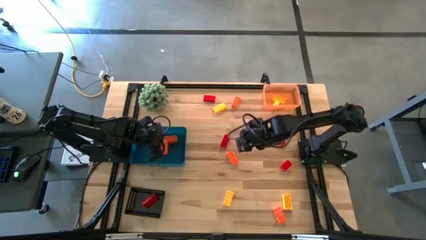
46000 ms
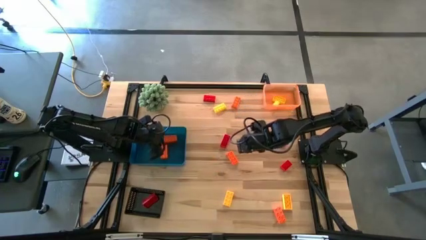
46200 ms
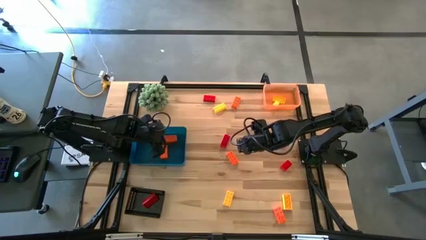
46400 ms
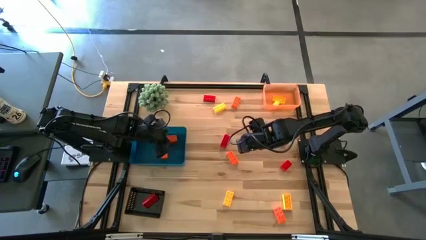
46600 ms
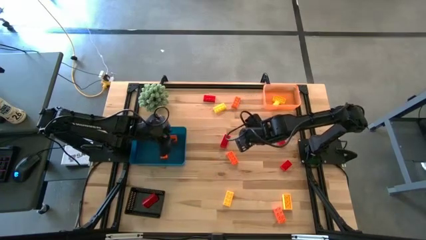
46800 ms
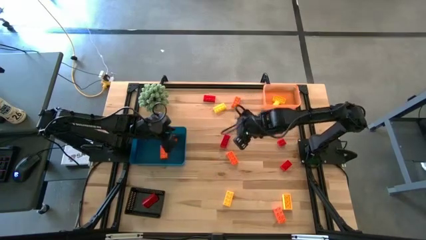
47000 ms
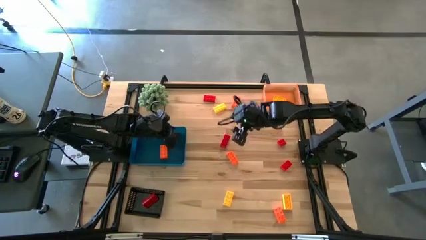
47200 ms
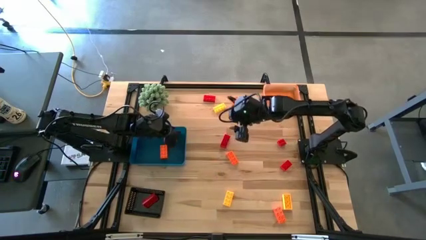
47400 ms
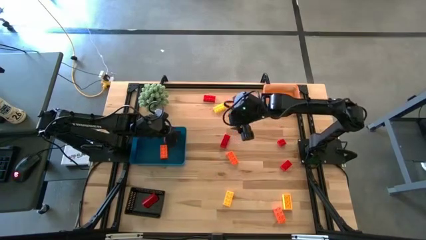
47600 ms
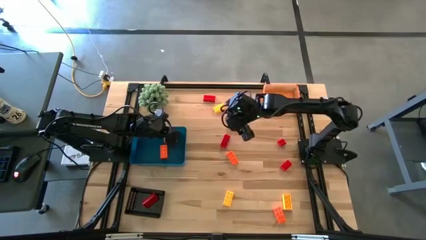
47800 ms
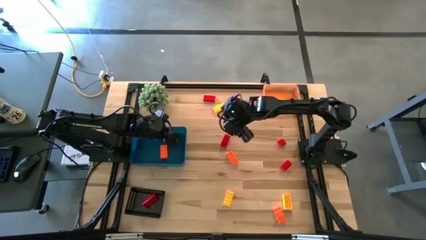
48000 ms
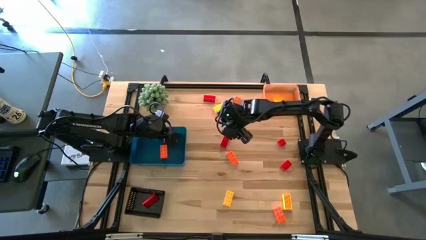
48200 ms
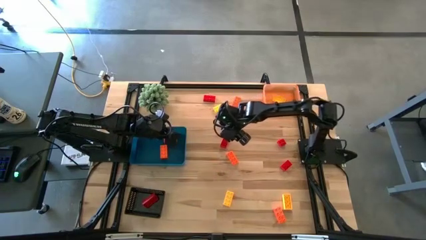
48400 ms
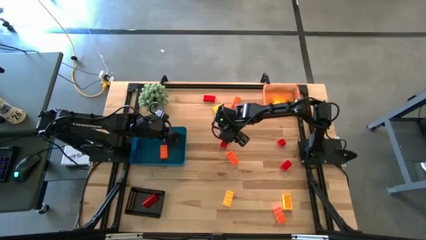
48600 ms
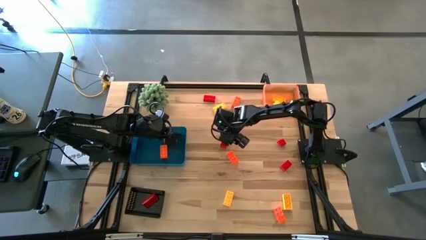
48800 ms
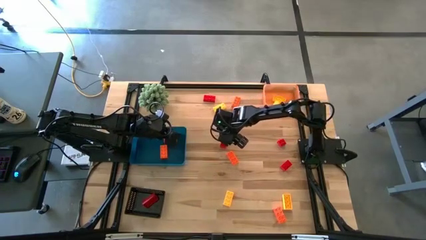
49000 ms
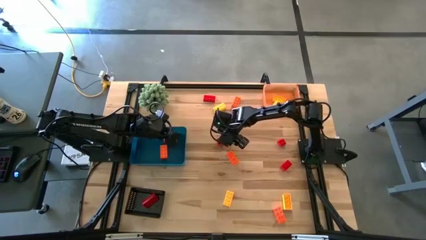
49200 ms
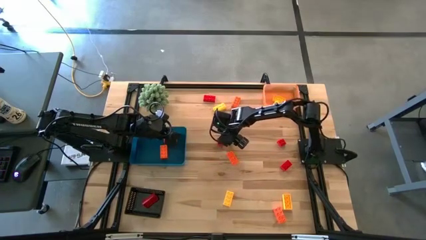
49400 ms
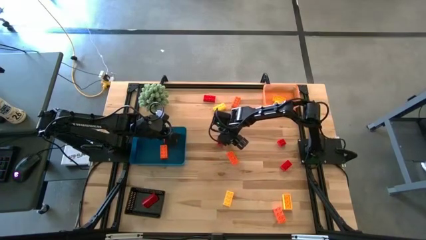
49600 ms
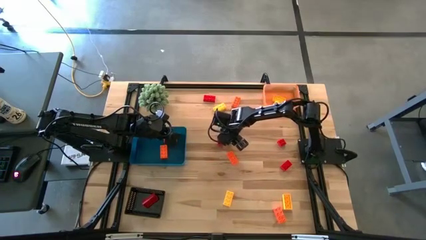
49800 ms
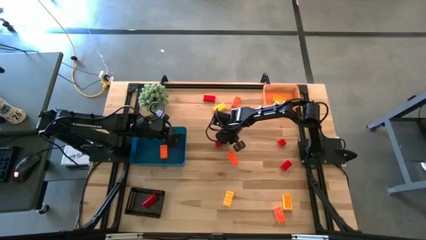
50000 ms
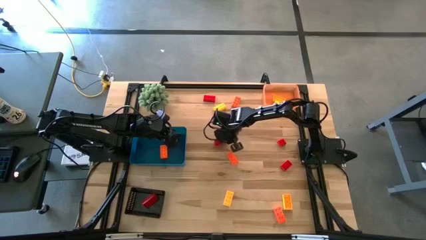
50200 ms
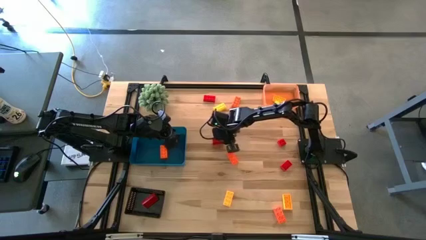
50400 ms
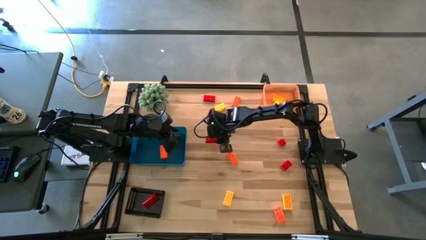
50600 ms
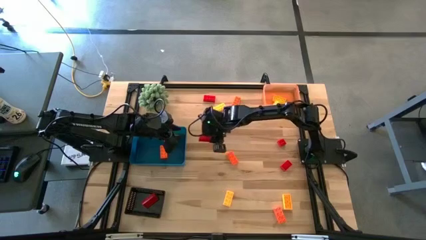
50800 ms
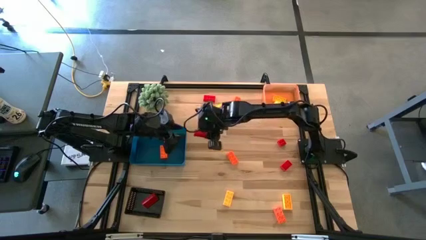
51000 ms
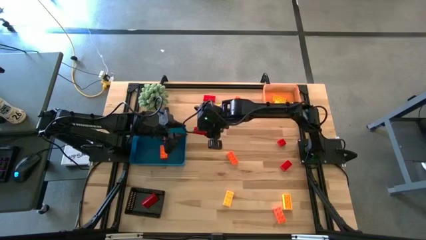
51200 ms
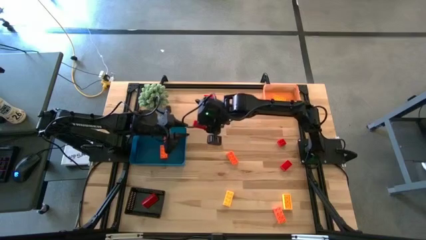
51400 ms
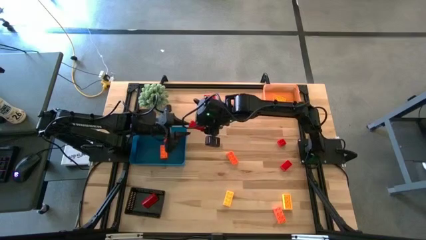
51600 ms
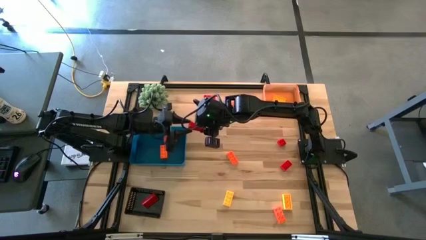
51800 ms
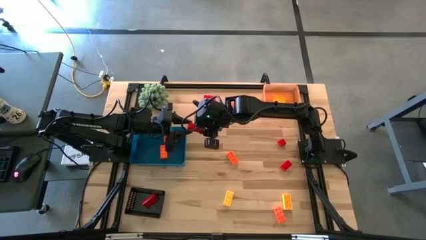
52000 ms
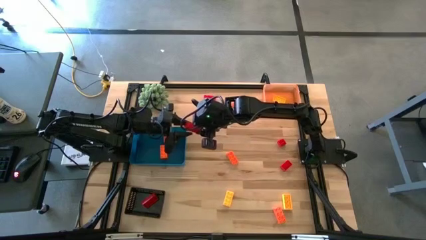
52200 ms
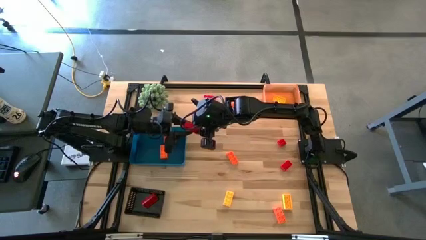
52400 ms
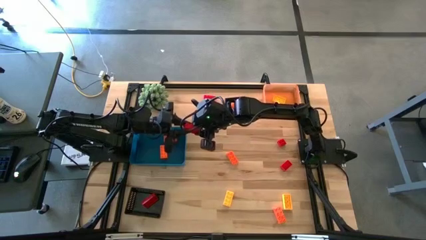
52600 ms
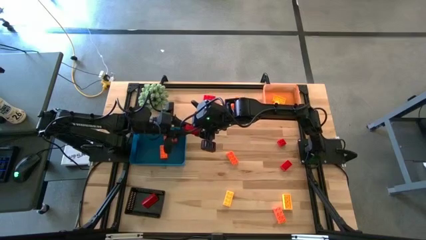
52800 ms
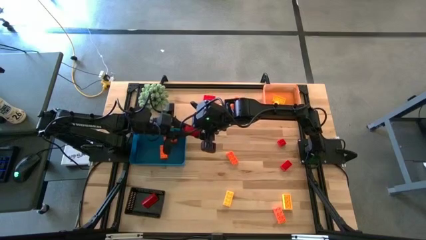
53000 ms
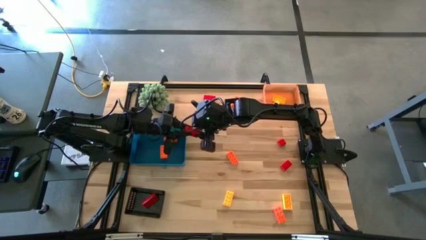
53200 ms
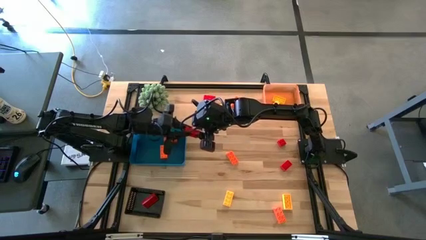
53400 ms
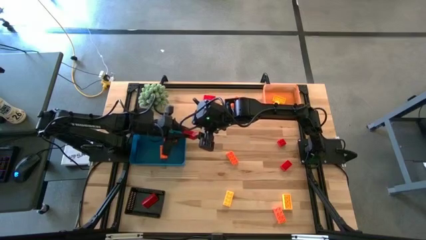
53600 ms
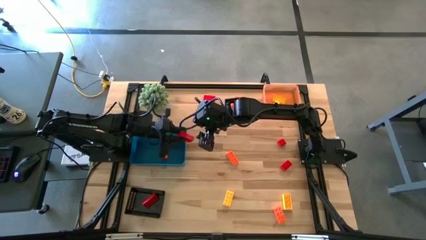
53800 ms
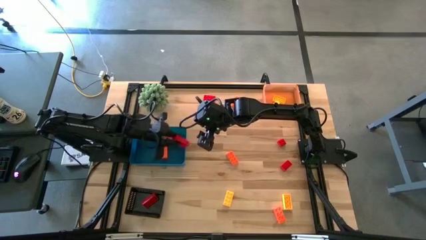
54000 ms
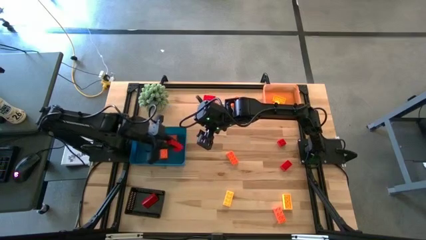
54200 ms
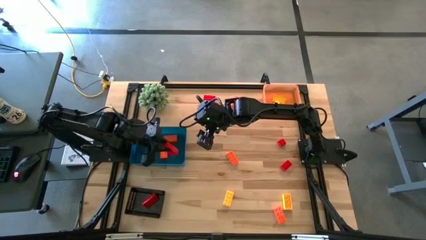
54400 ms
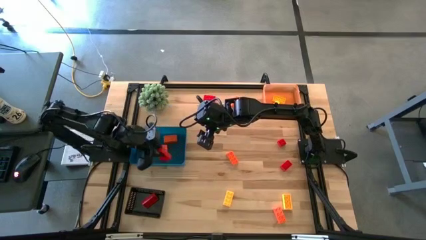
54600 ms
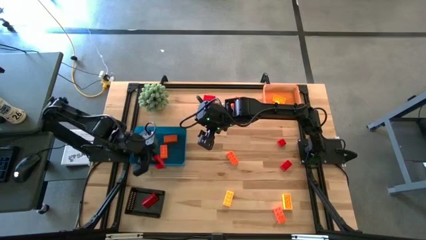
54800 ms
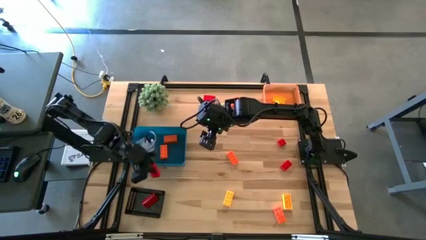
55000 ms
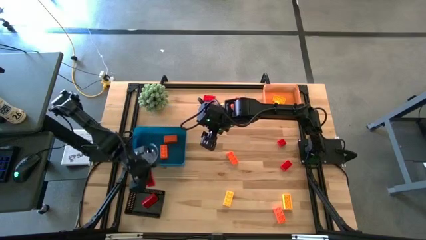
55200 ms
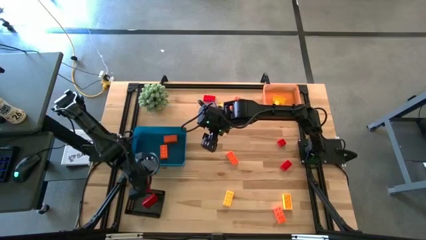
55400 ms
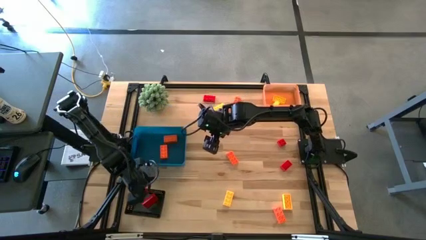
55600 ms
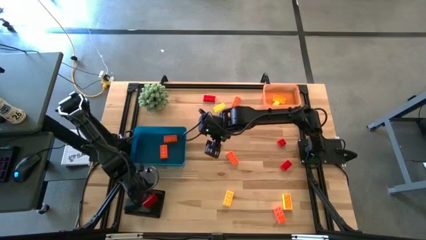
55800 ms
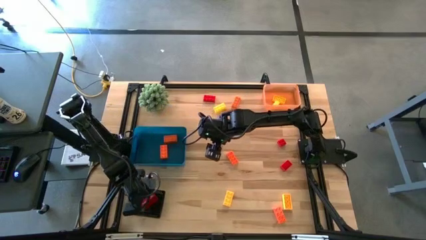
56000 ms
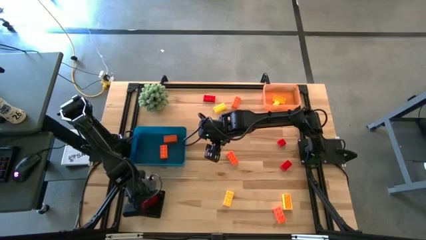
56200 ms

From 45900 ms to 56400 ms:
Task: Sort & place blocks by color
Put the red game piece into the black bin
